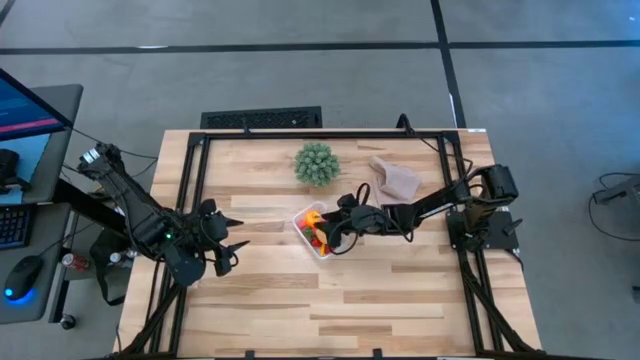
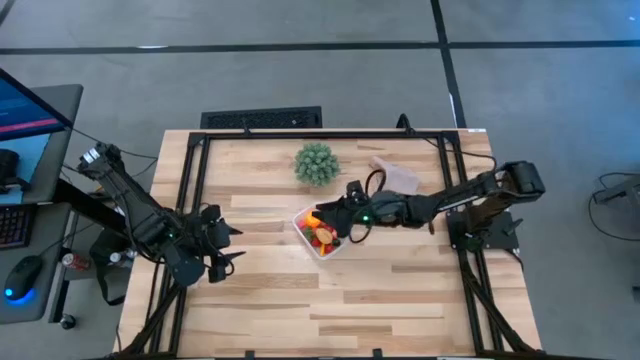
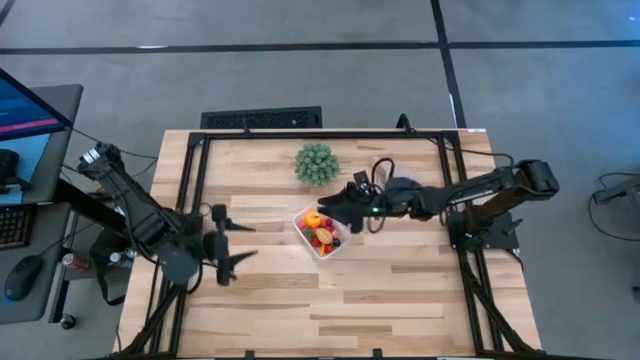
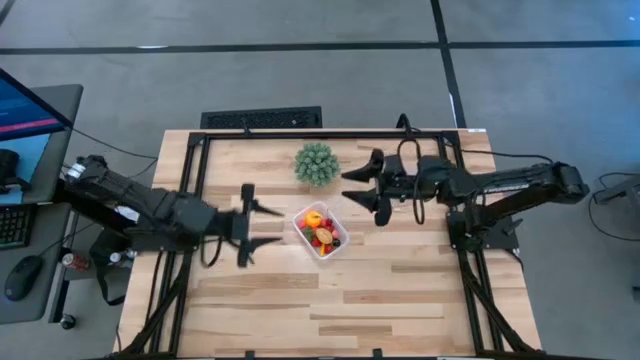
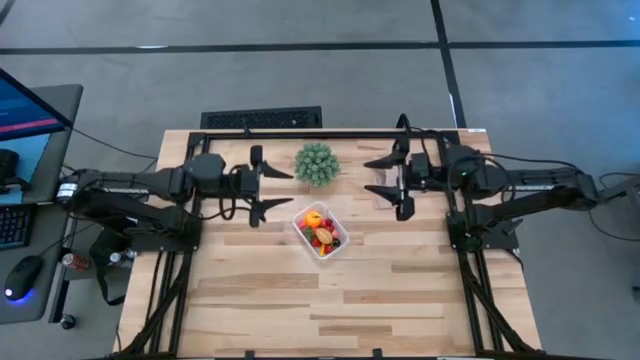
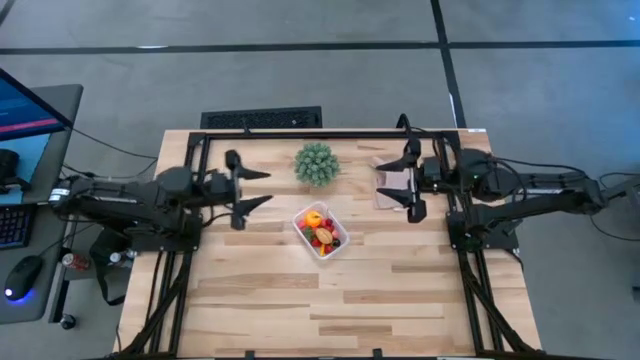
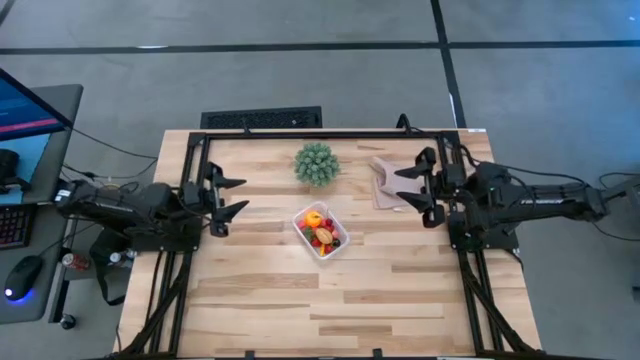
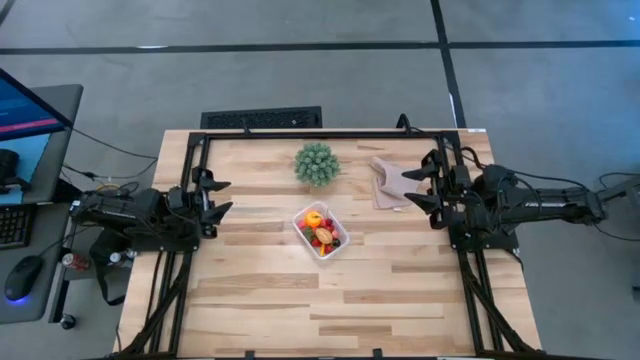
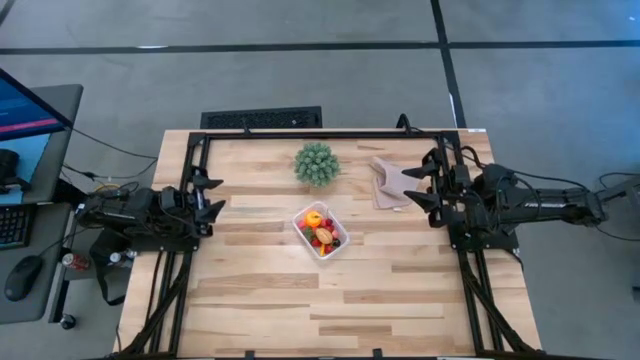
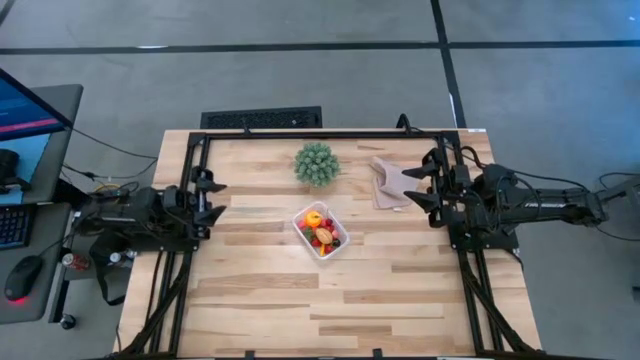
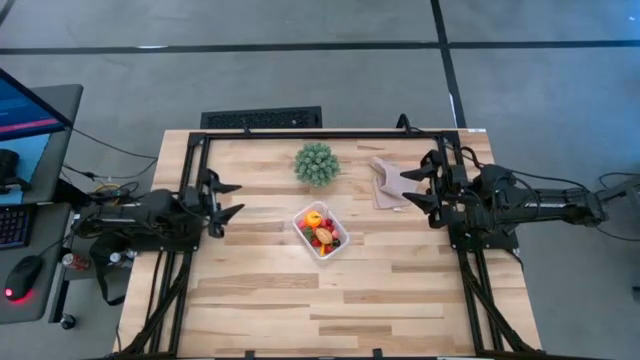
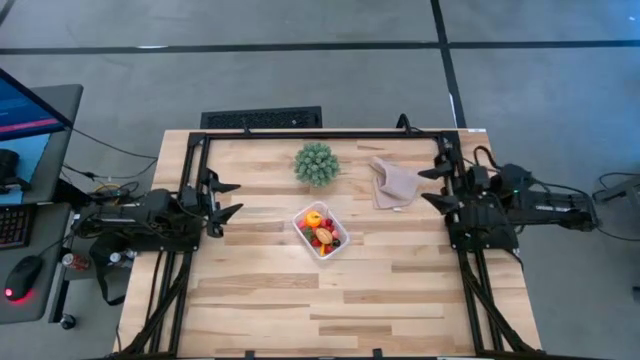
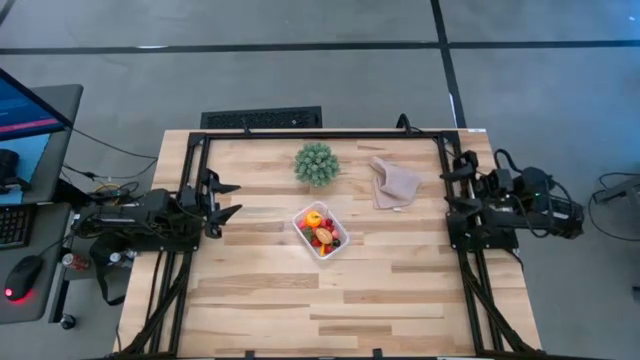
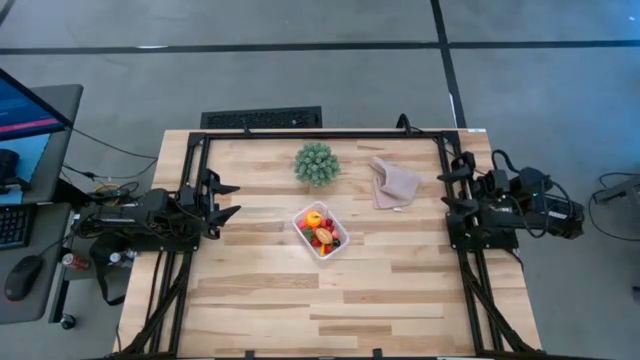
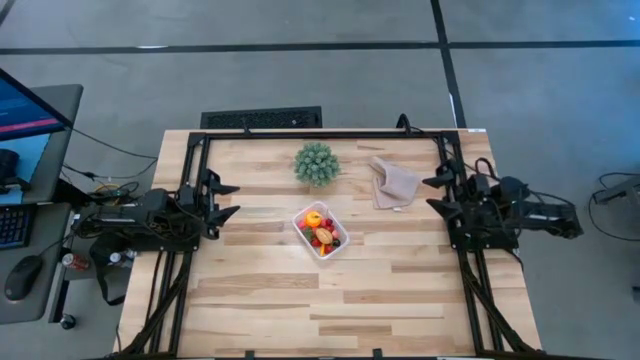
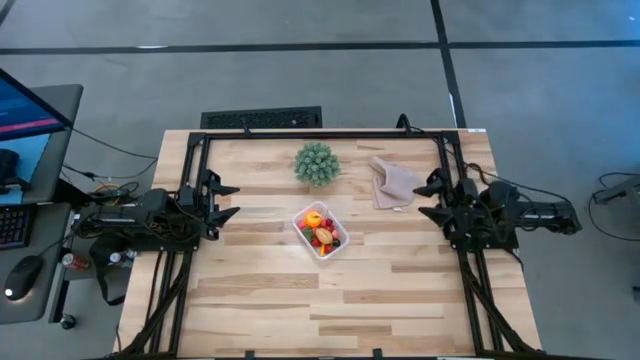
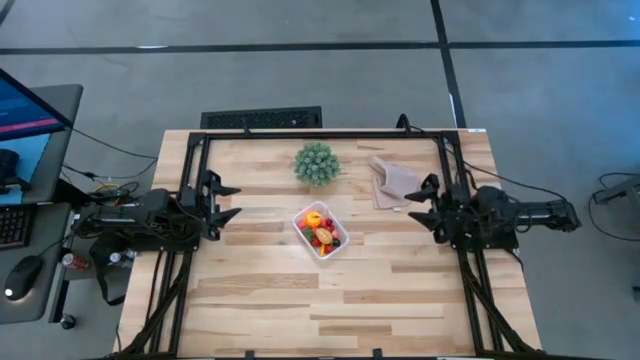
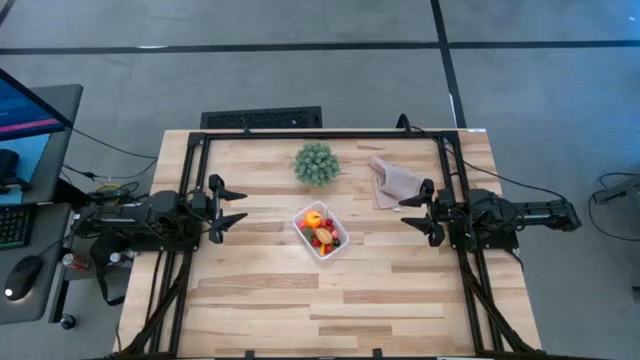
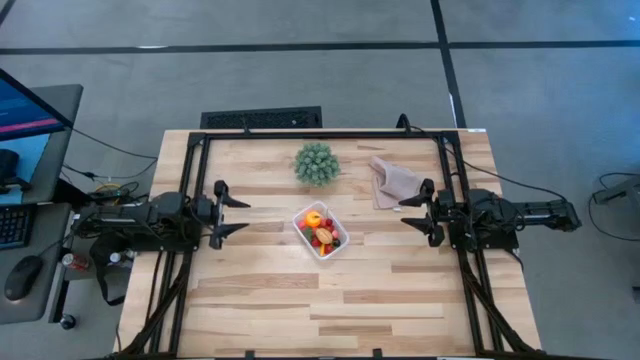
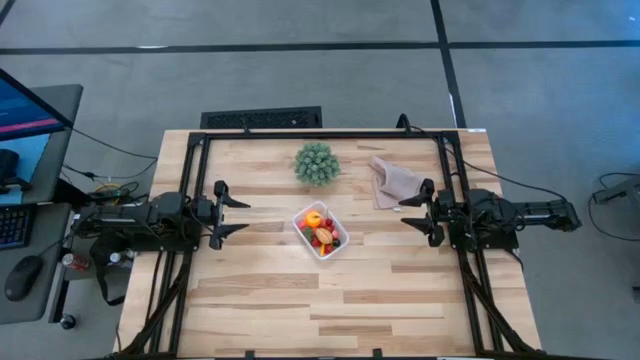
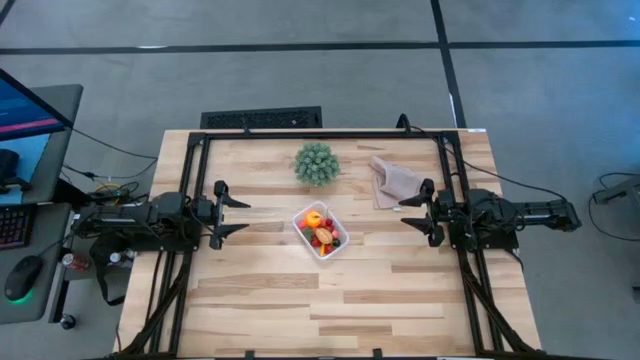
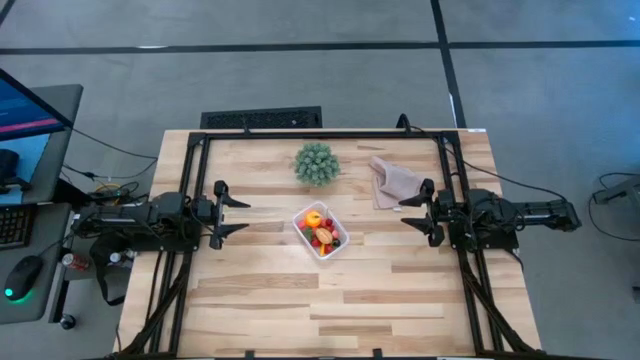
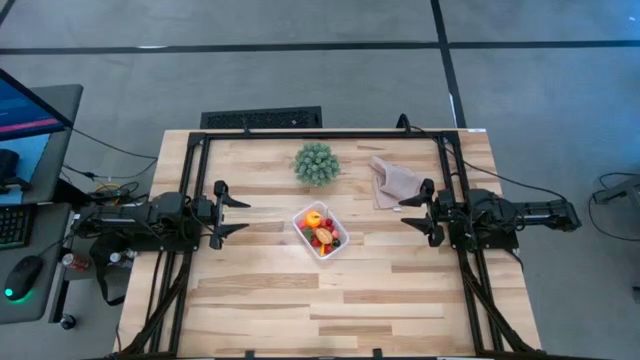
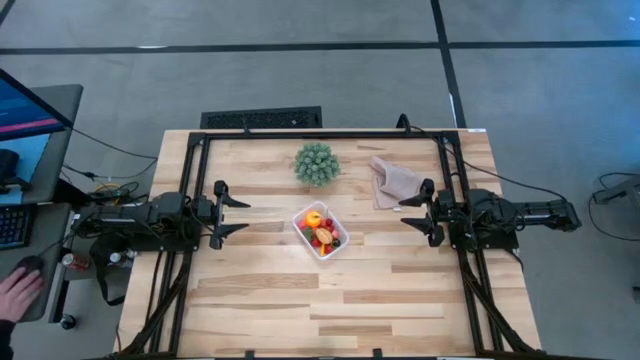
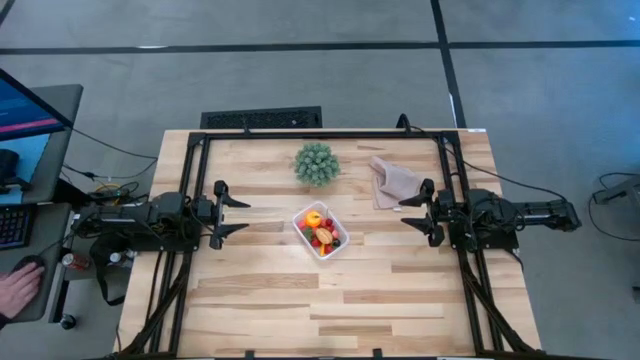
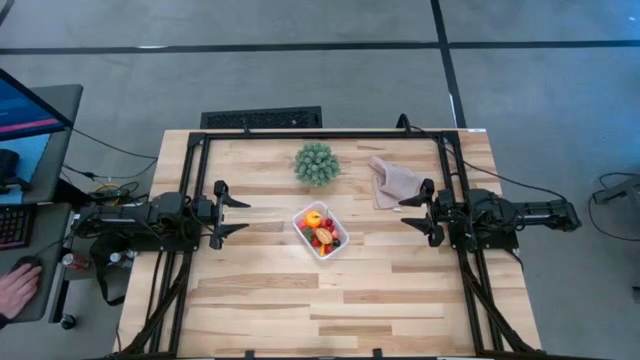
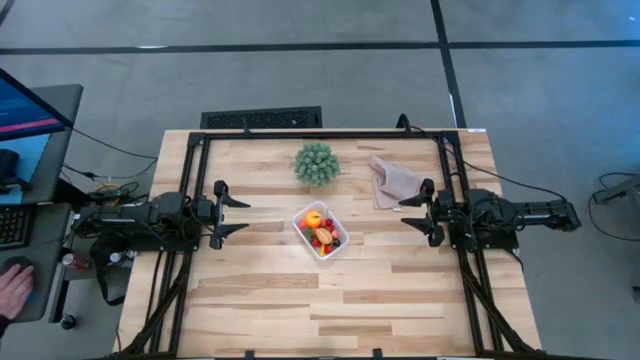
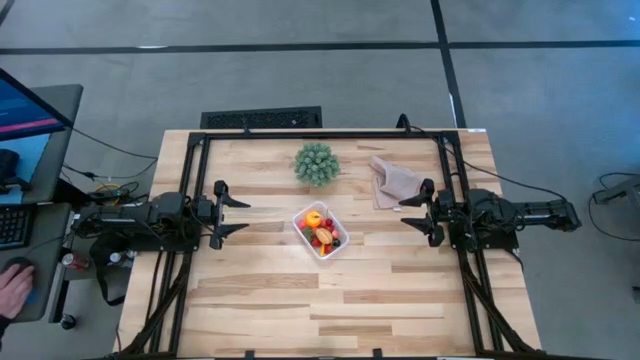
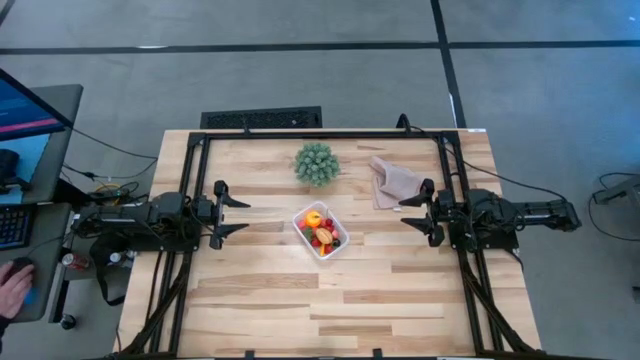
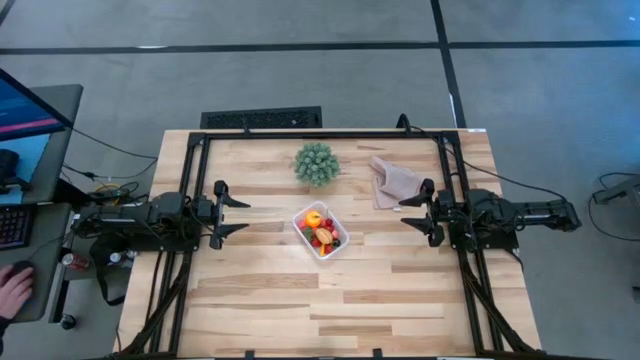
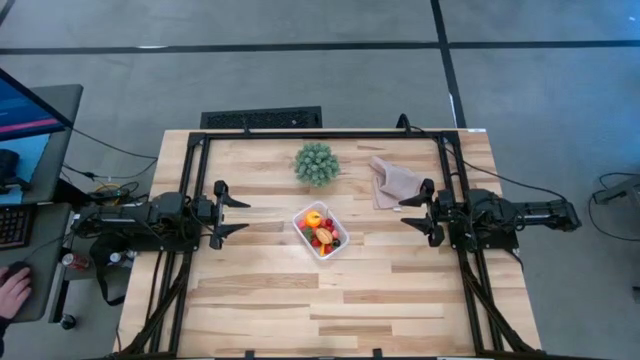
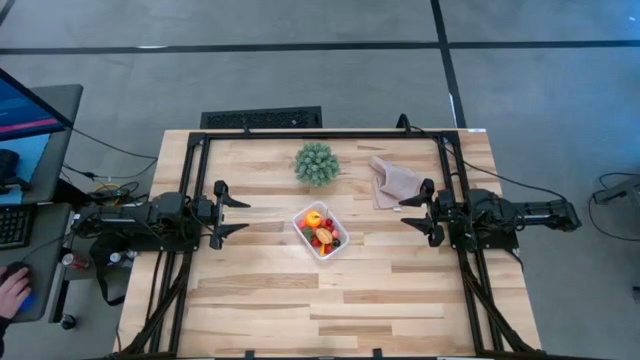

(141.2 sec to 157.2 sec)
Task: Pick and placing Produce into tupperware
Return to Home Position

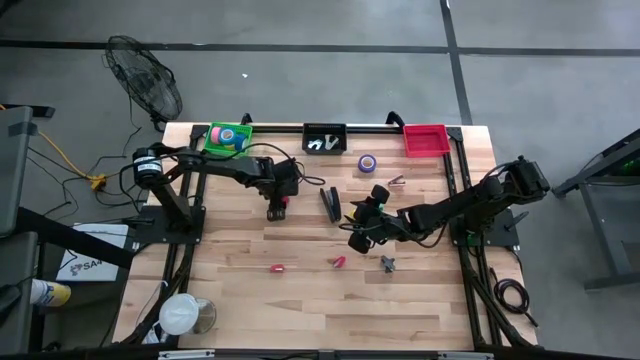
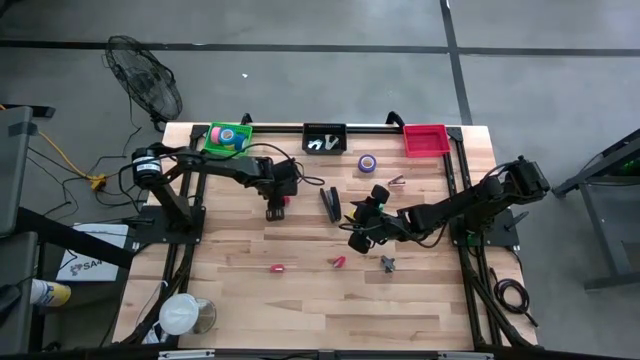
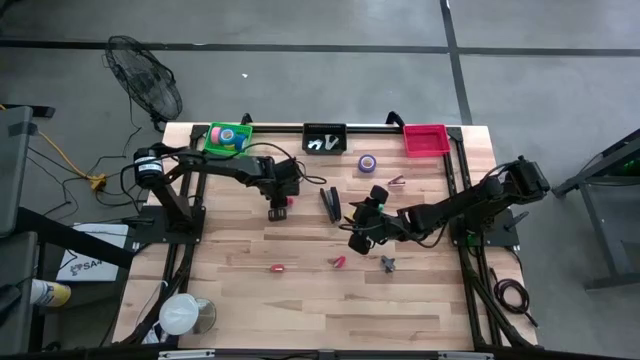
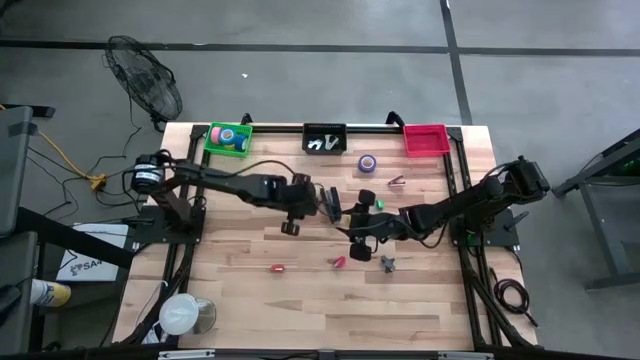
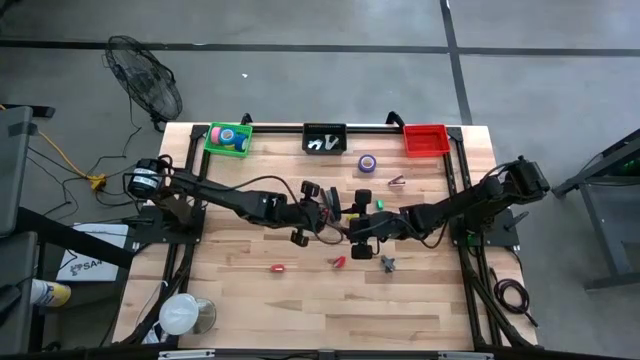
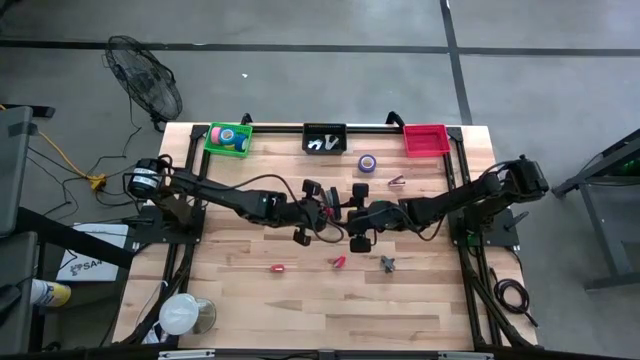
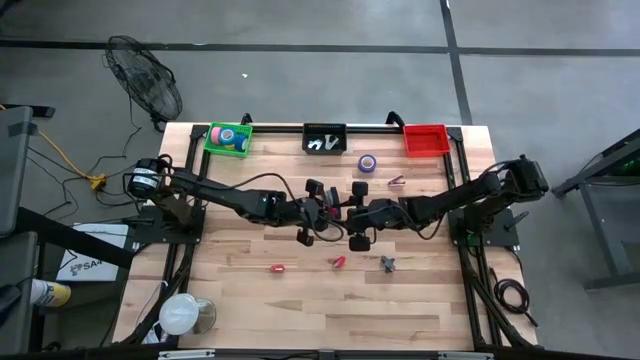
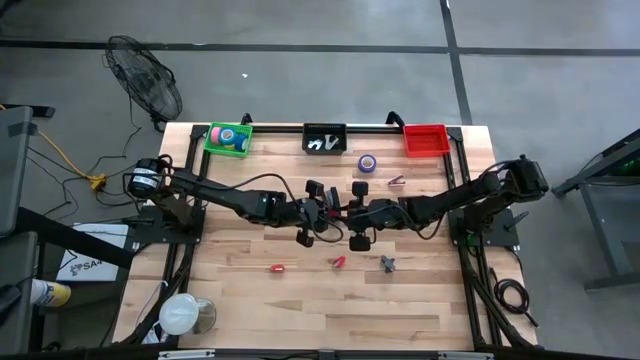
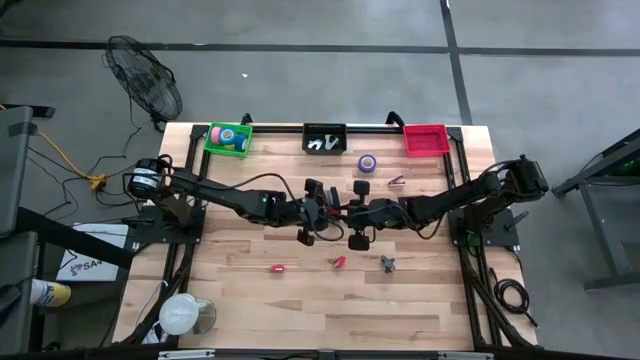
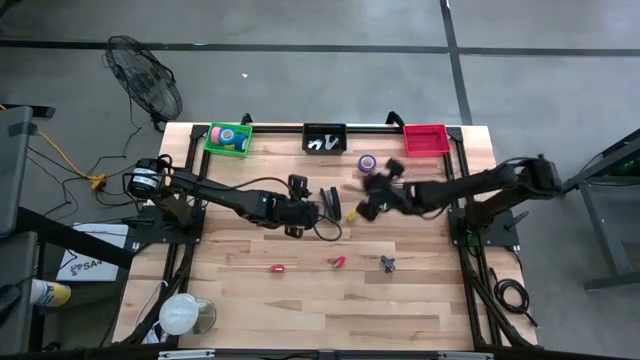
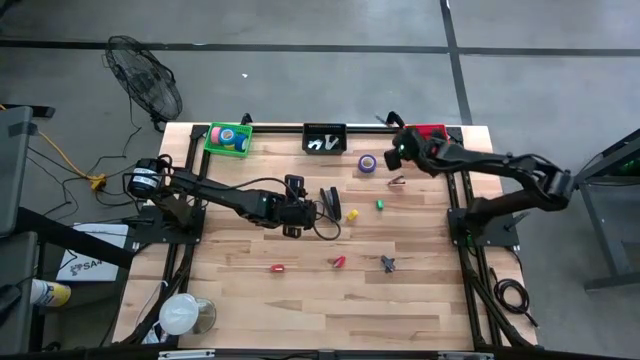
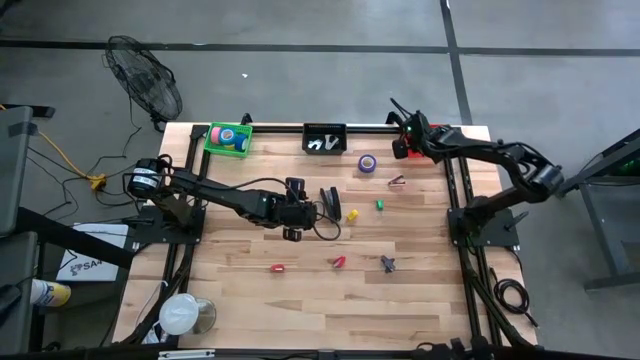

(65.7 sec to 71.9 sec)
Task: Pick and place Stapler, Stapler remover, tape
Put the top red stapler in the red bin
